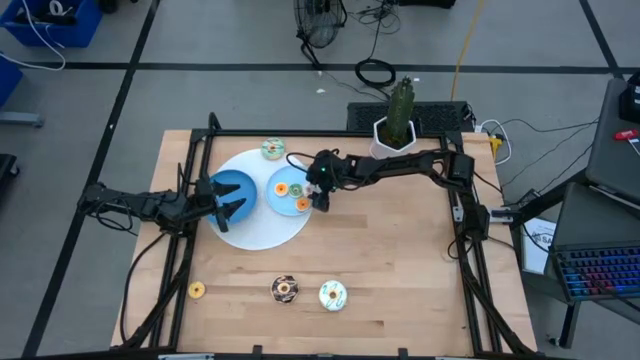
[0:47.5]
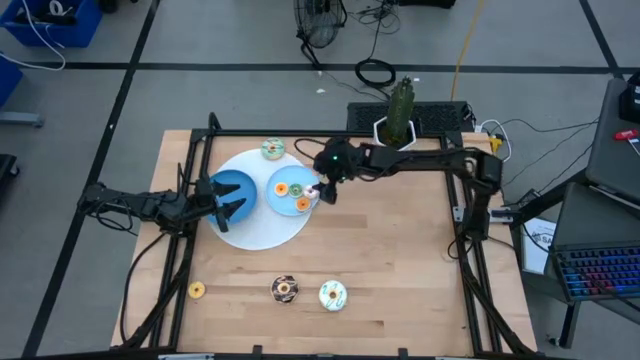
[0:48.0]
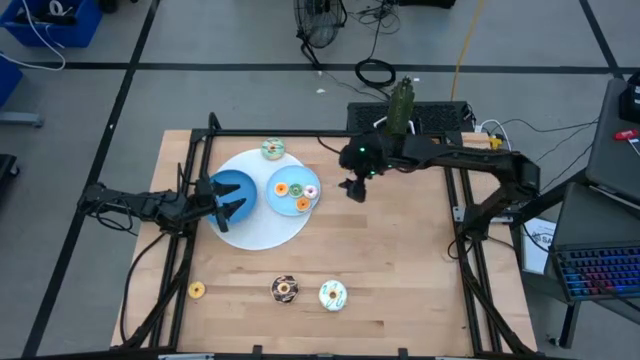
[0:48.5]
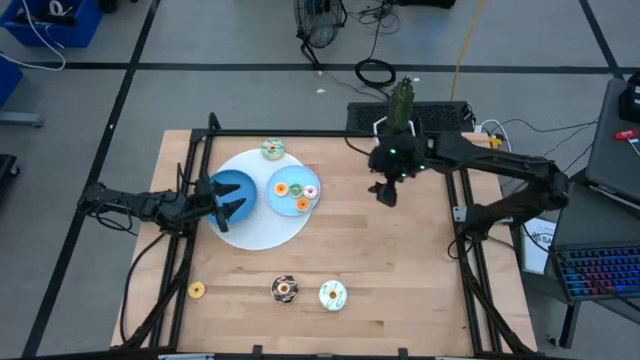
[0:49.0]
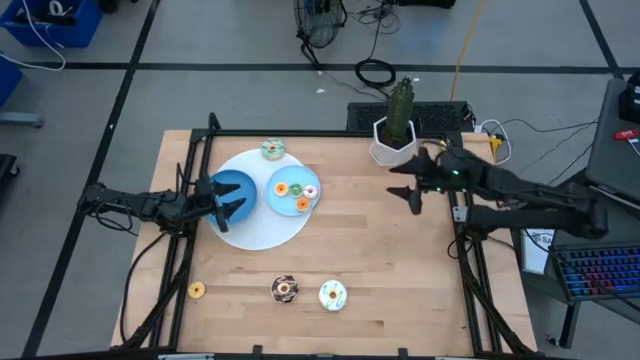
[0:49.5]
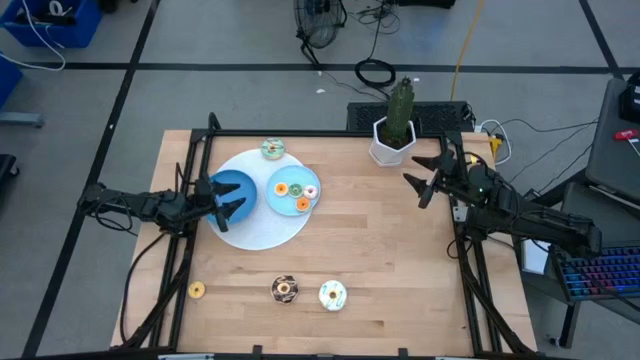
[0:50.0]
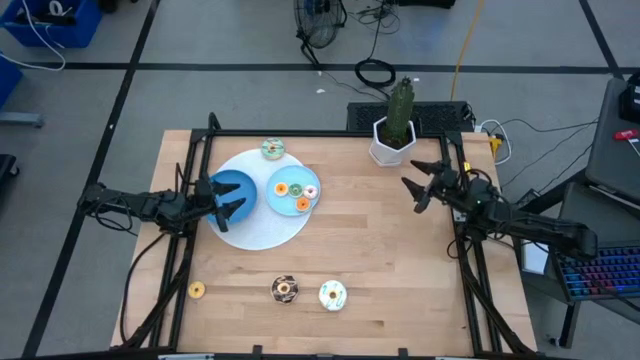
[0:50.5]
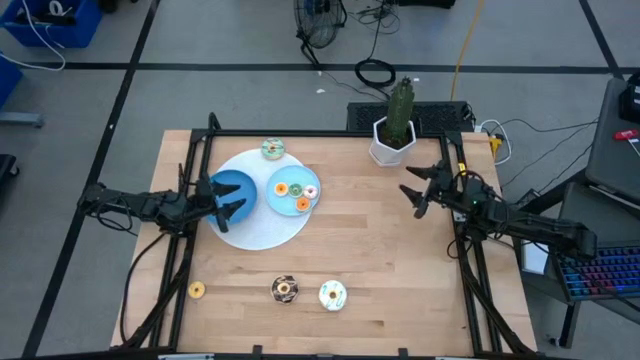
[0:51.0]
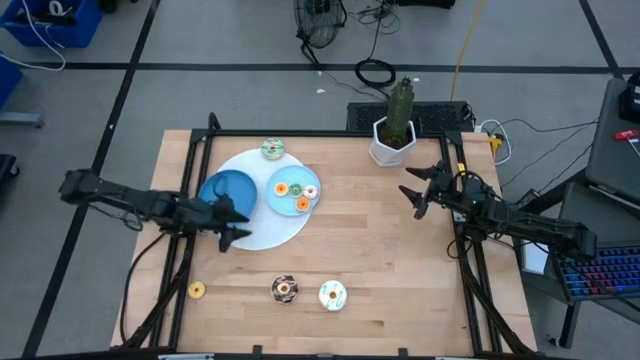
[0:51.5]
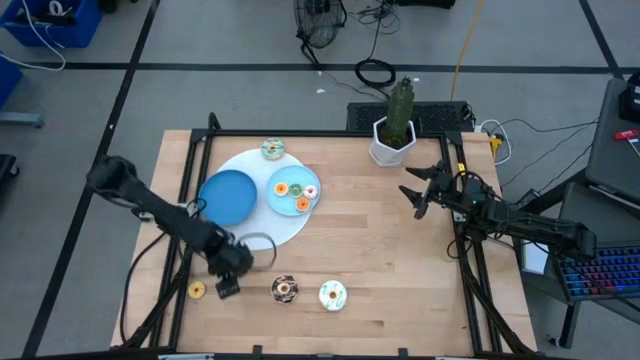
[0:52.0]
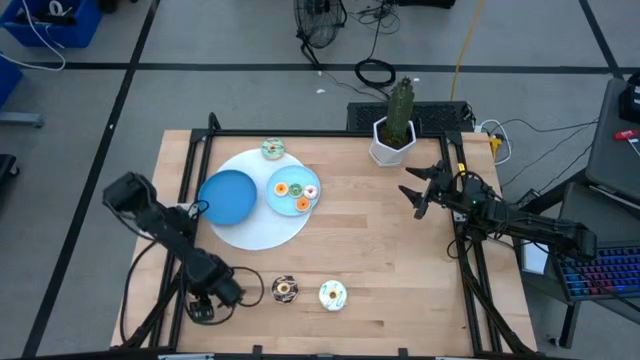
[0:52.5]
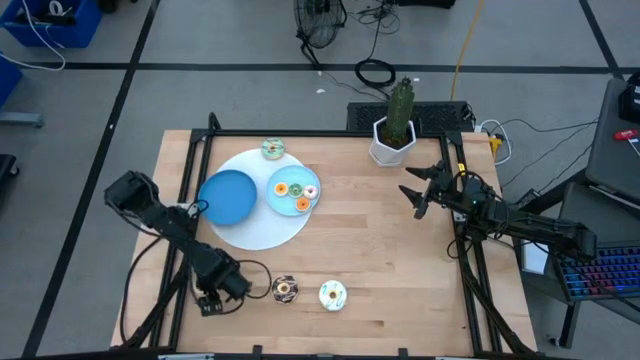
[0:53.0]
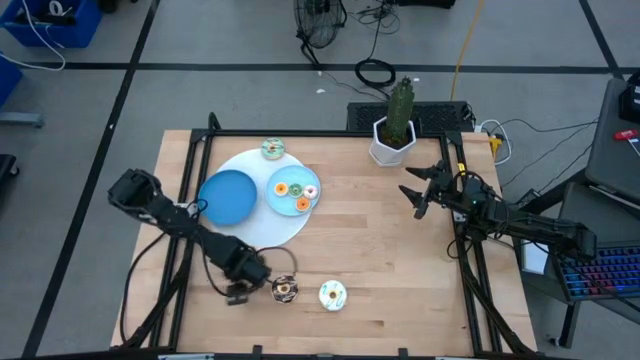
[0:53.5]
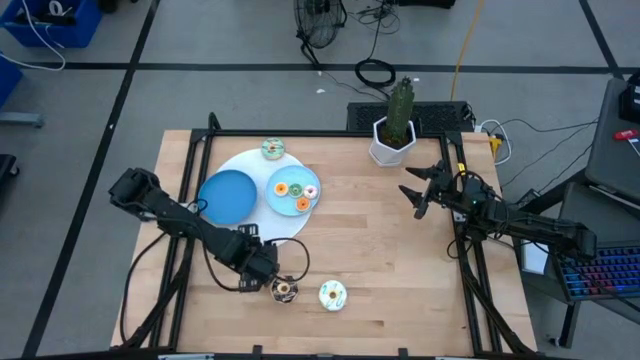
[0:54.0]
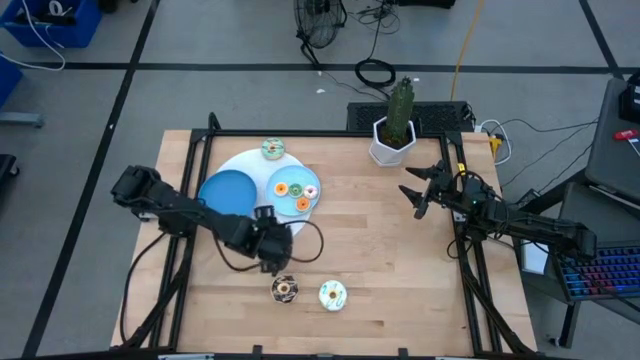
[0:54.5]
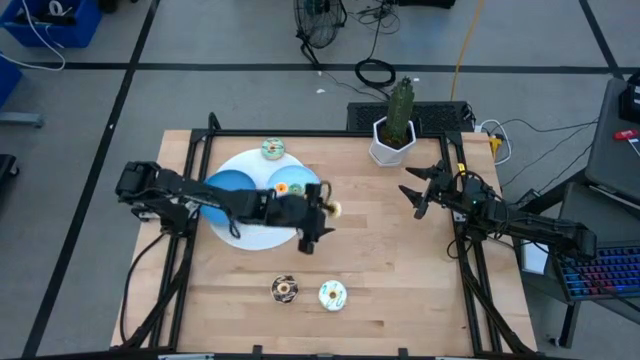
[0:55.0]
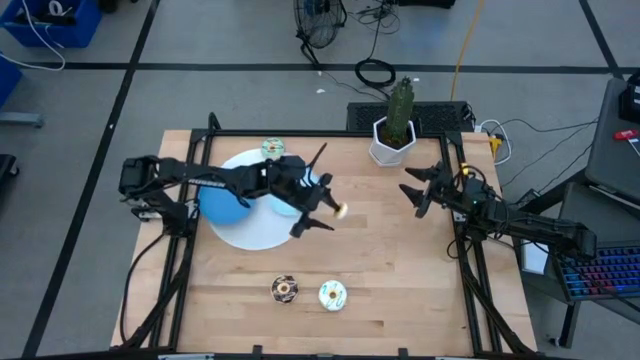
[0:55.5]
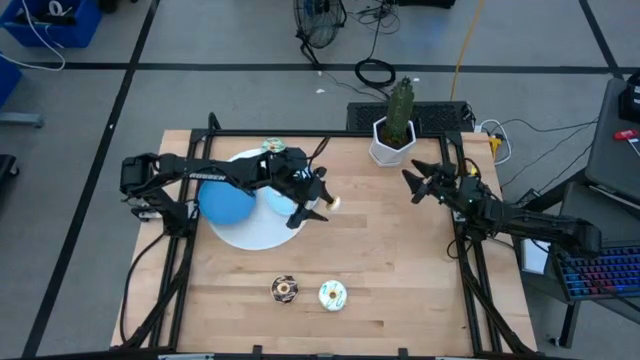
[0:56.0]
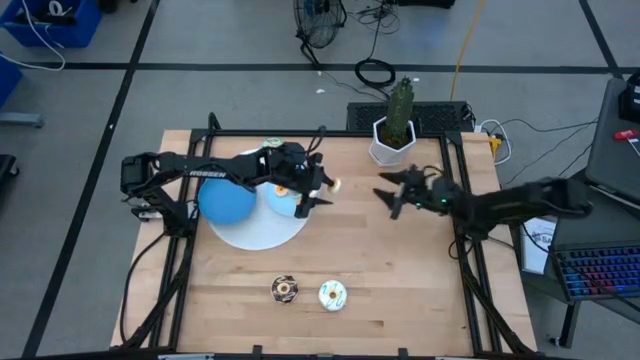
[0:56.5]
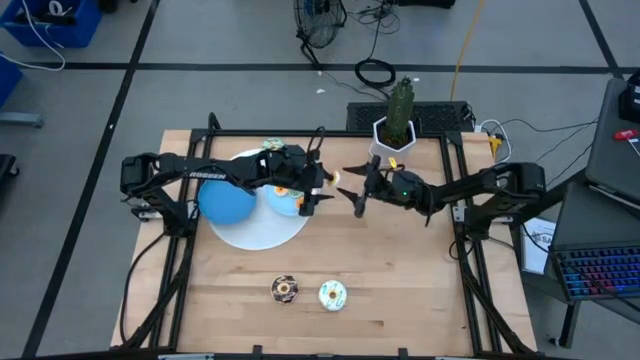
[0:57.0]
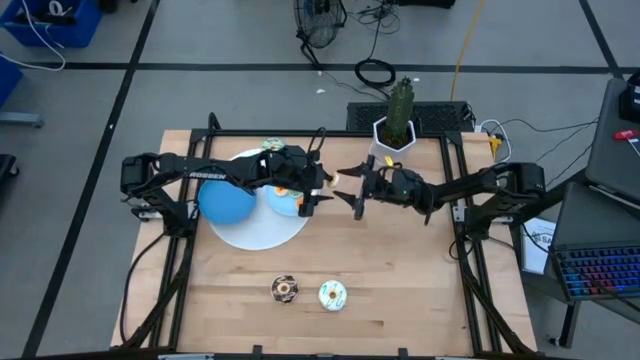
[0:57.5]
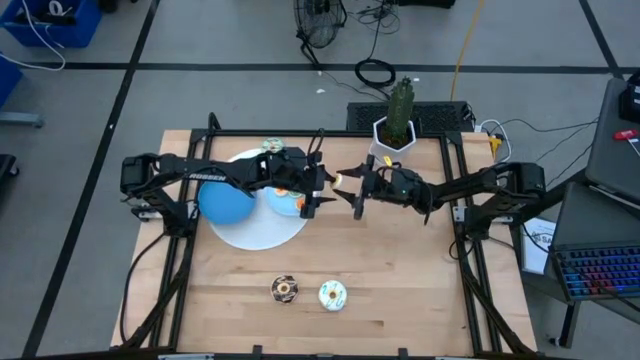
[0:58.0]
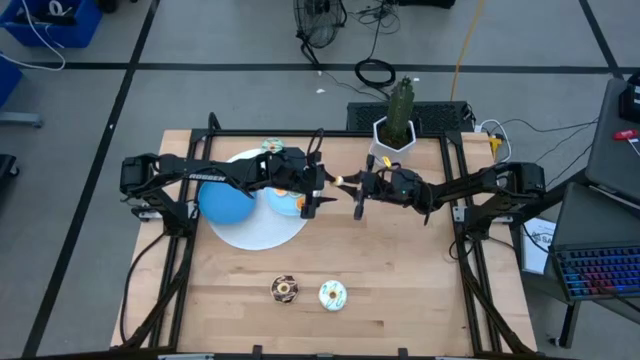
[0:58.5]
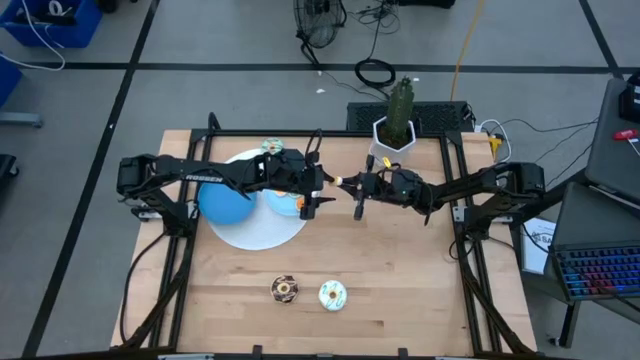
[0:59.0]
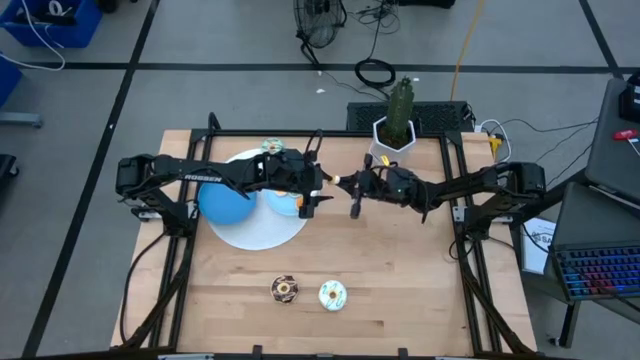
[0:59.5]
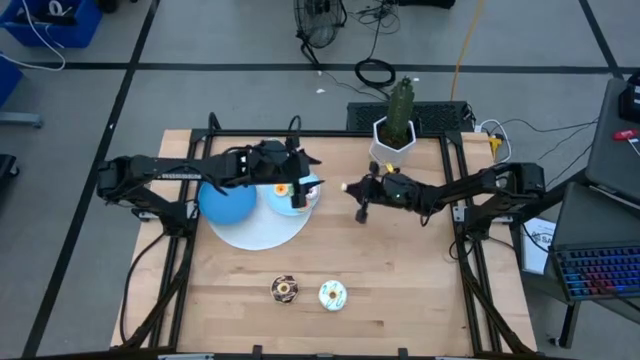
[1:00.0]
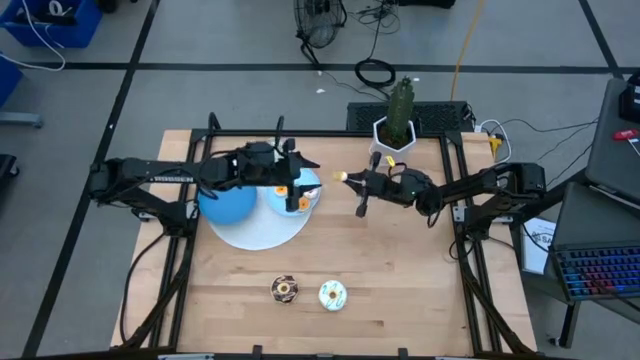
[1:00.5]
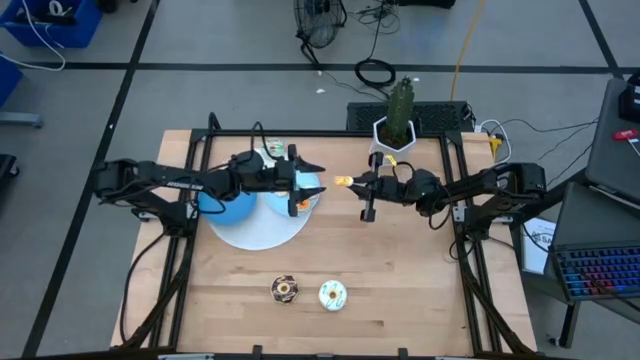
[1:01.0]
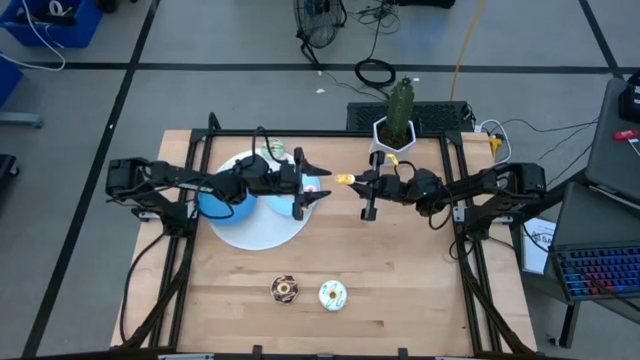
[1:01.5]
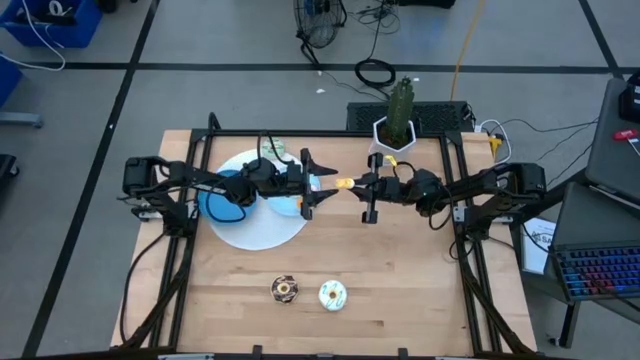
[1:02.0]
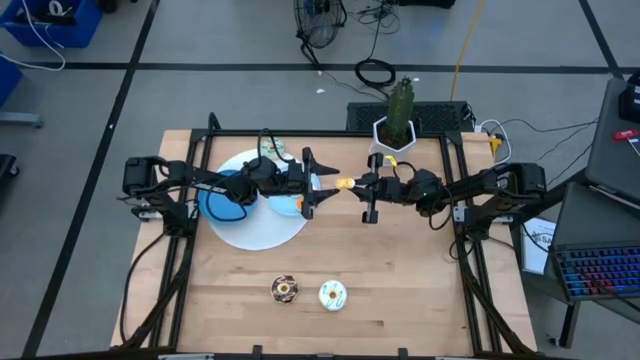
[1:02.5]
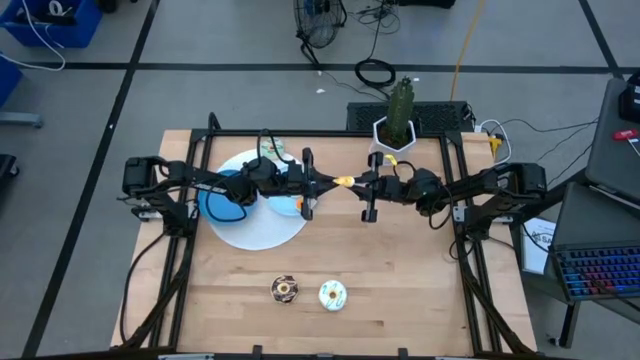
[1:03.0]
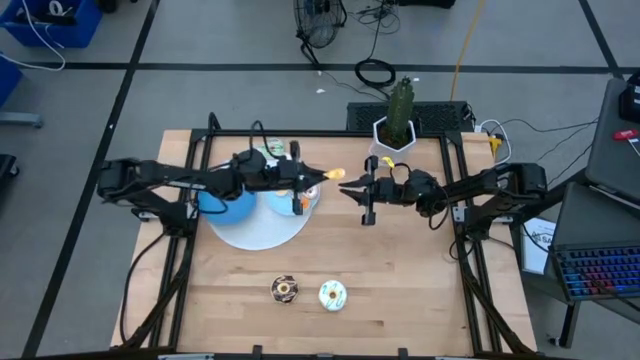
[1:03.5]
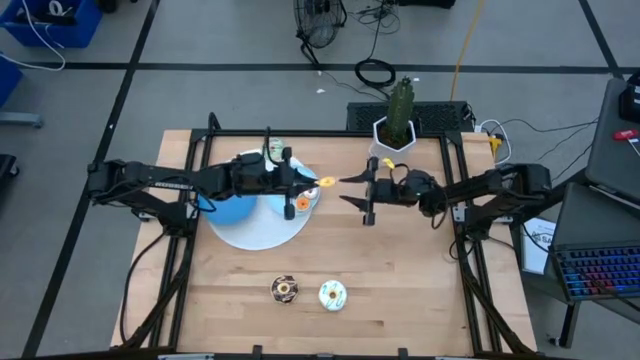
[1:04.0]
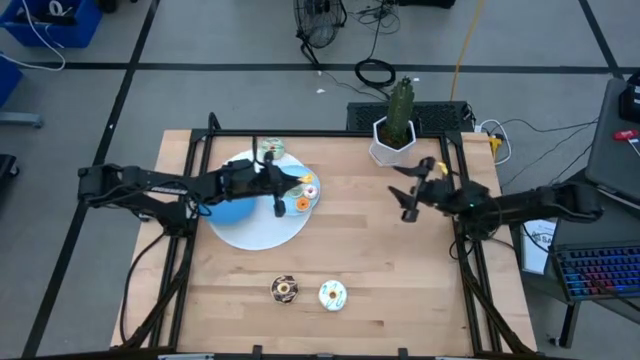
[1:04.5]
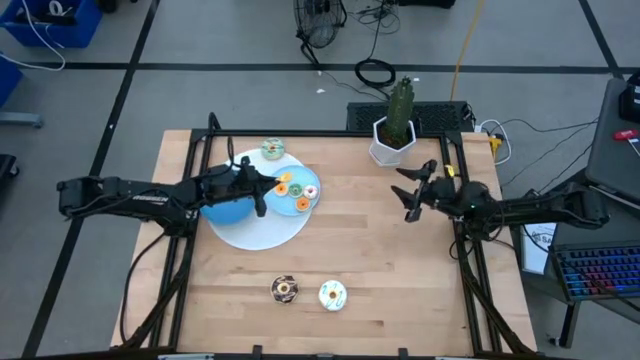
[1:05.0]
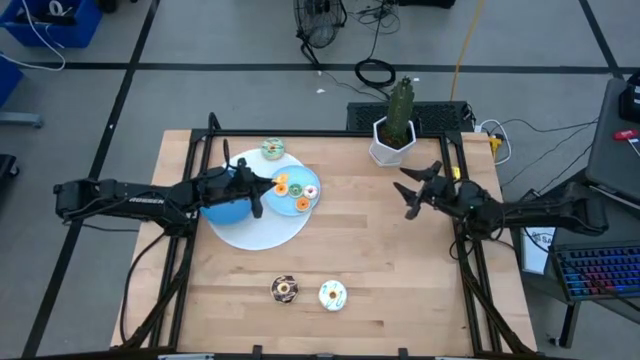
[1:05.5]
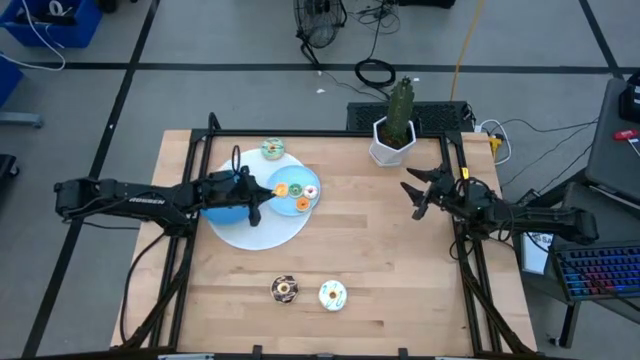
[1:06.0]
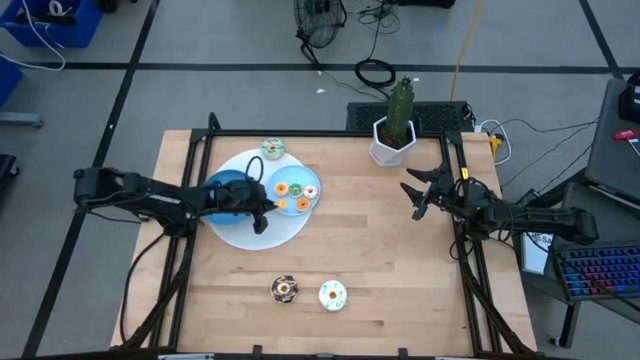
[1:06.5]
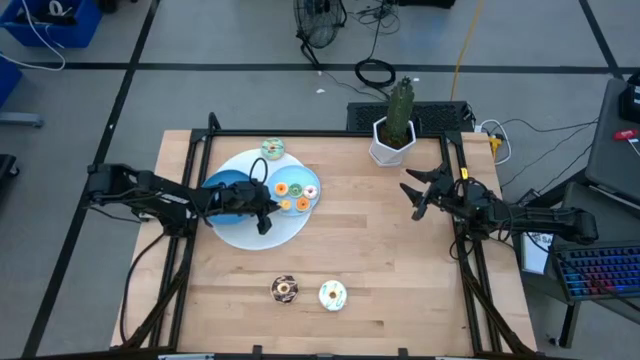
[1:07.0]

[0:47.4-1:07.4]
Task: Pick & Place donuts
Put the small yellow donut on the blue plate
